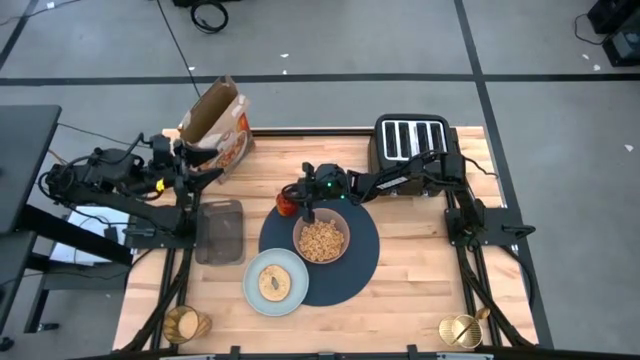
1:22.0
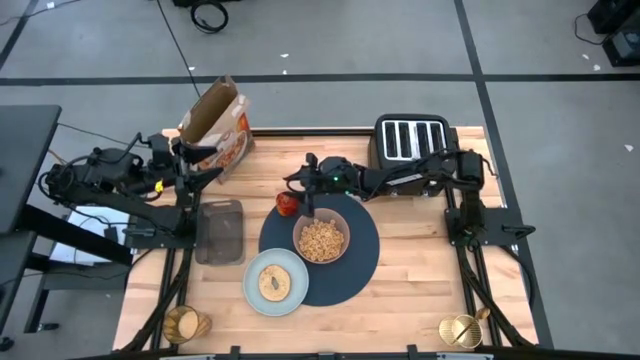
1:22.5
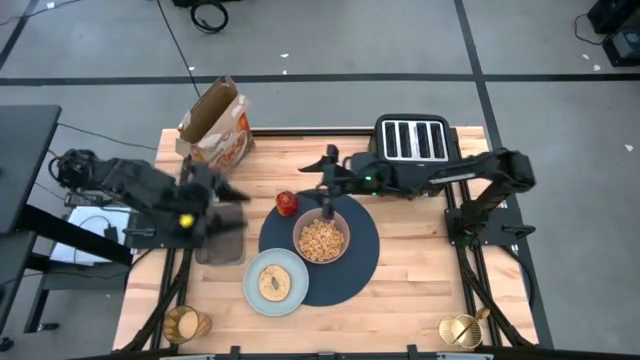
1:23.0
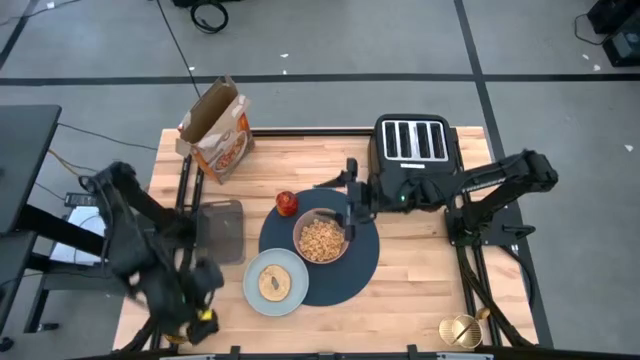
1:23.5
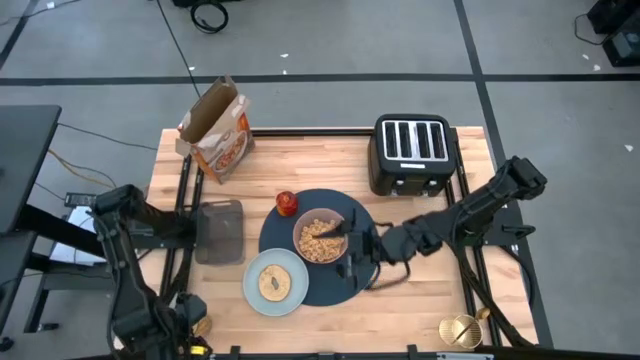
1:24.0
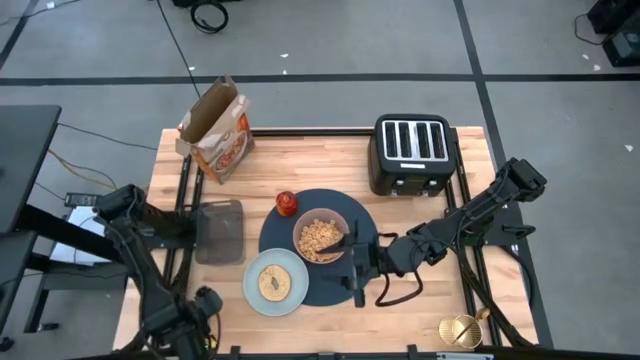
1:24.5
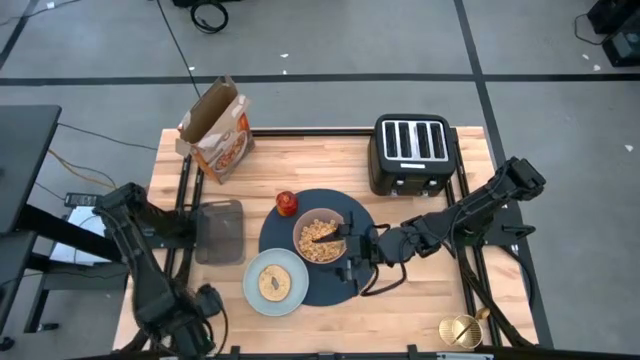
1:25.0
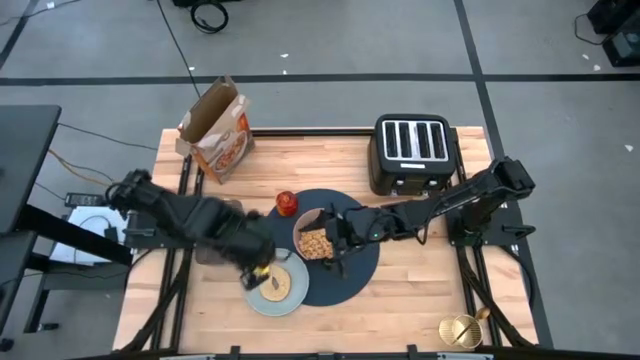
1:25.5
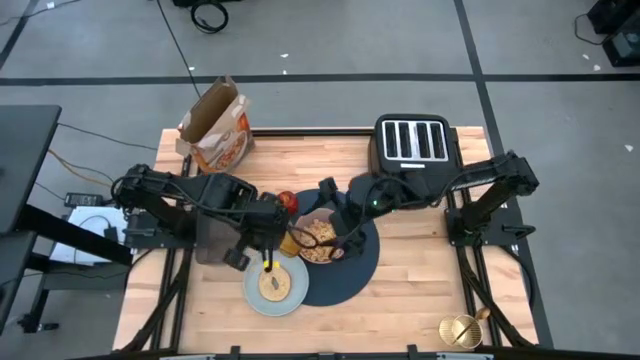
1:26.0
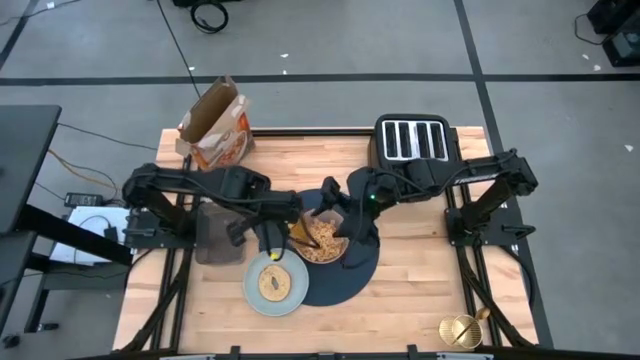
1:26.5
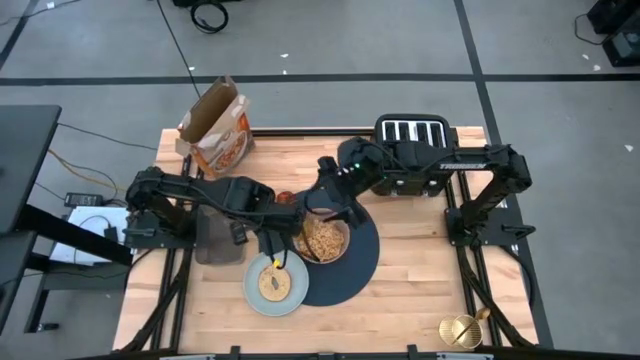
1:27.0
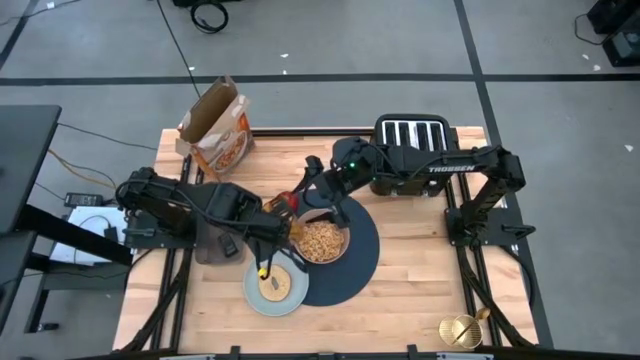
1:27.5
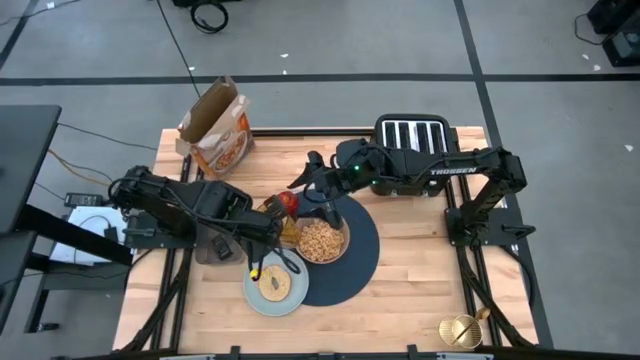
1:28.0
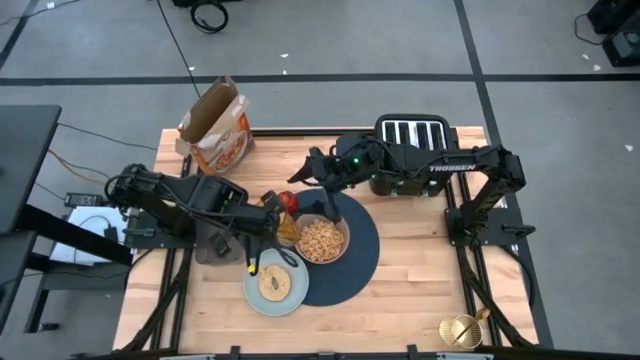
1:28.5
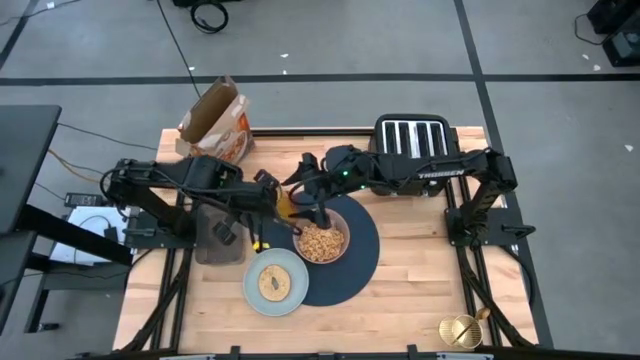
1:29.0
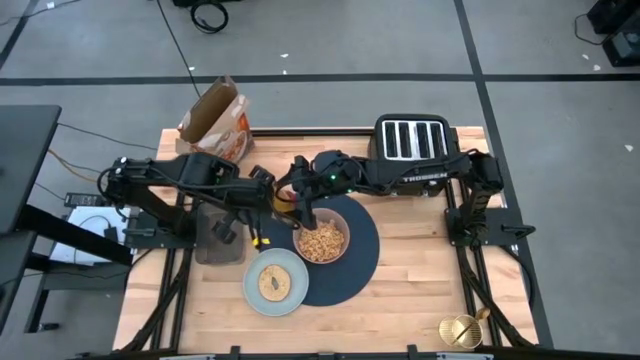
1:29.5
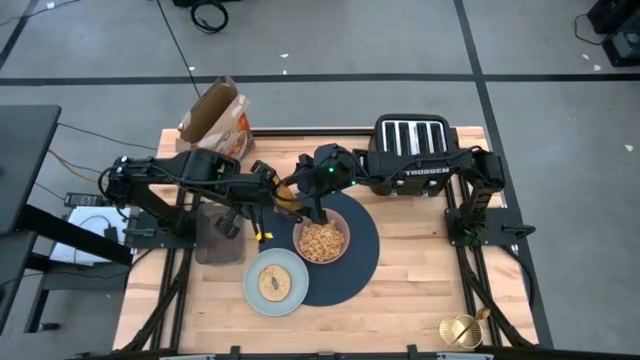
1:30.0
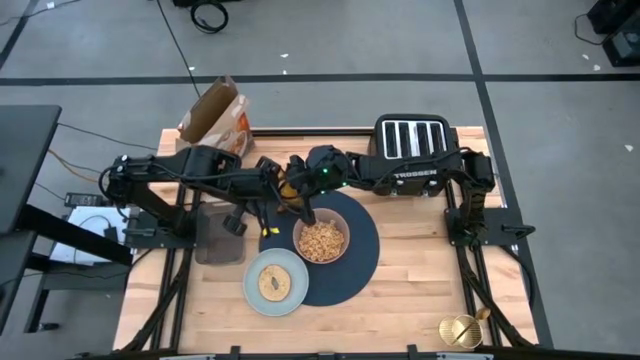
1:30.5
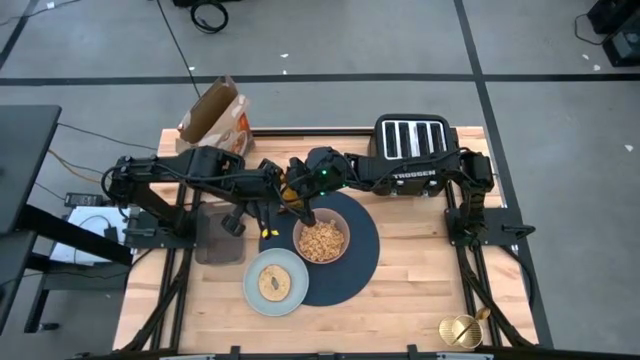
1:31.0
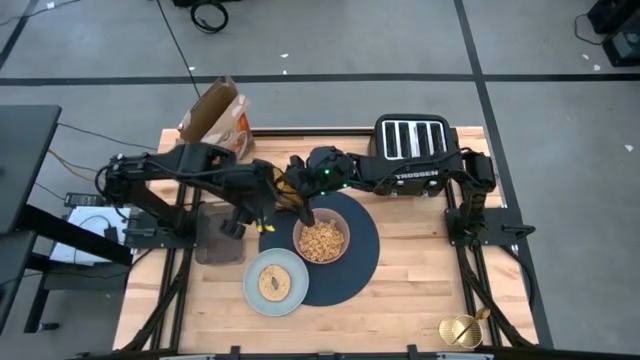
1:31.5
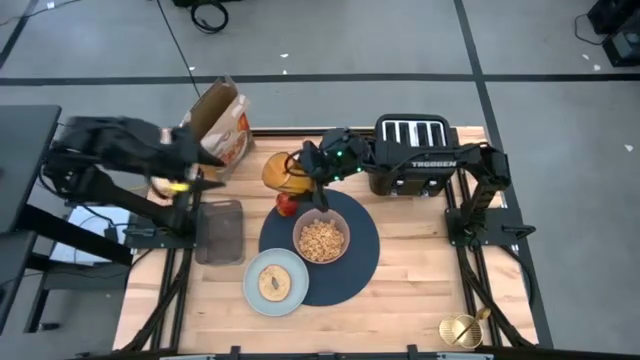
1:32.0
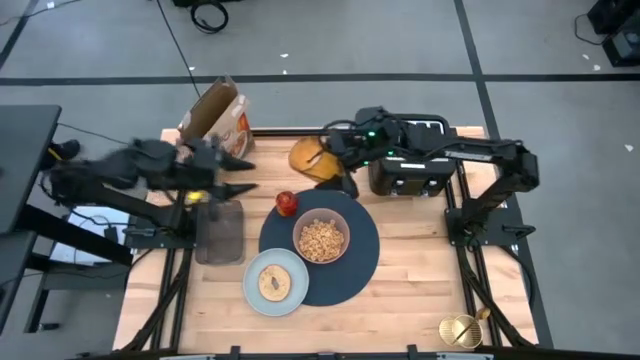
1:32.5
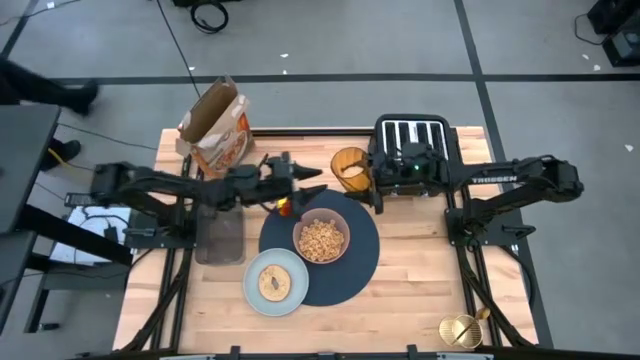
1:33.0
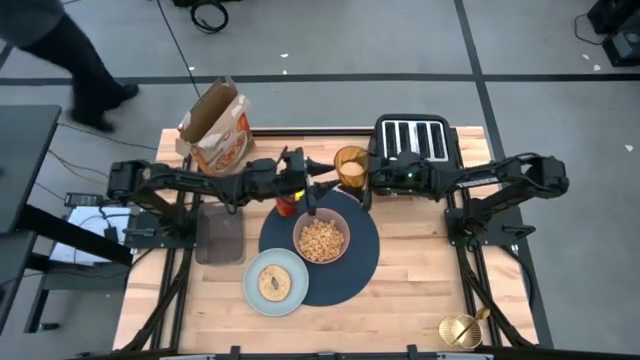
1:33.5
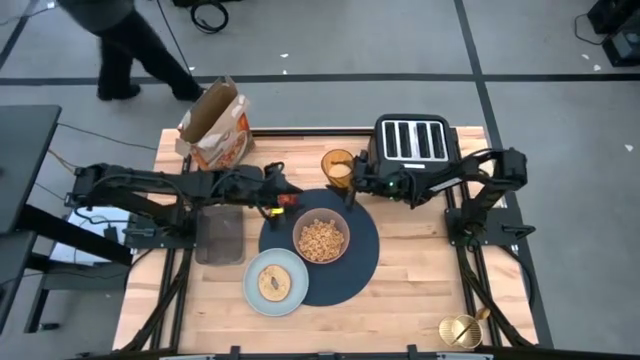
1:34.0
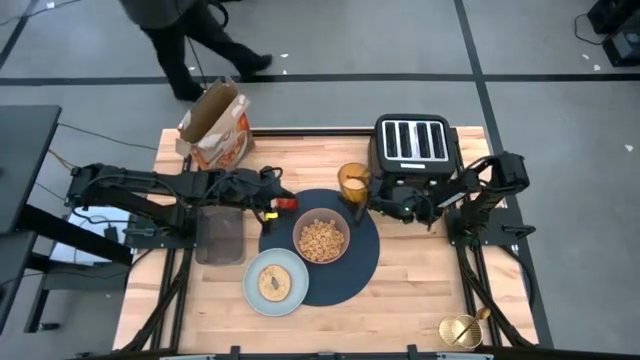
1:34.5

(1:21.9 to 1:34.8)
Task: Arrange a breakfast setting
Put the yellow cup on the top right of the orange bowl on the blue placemat

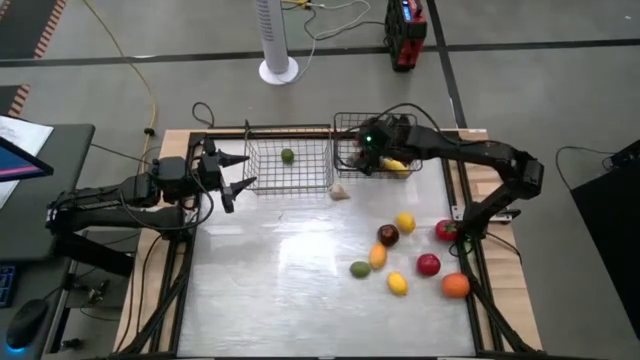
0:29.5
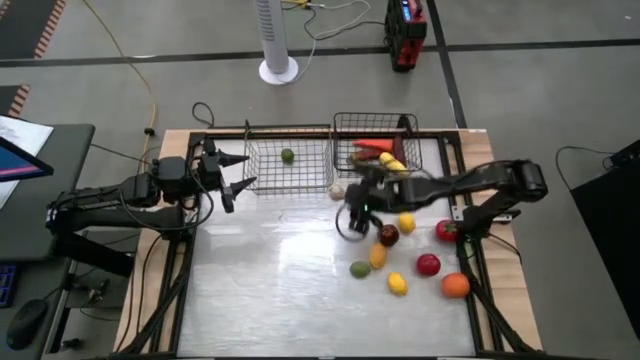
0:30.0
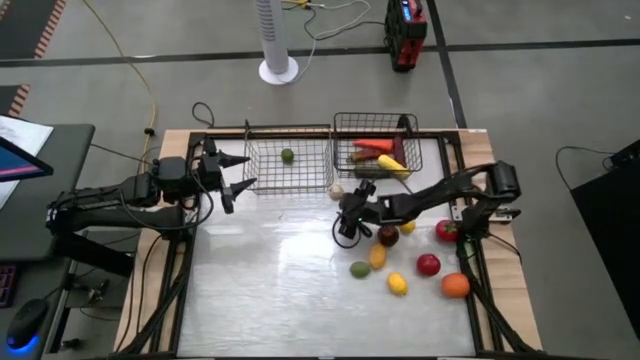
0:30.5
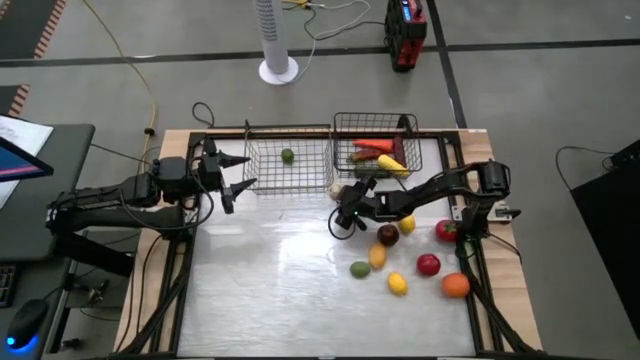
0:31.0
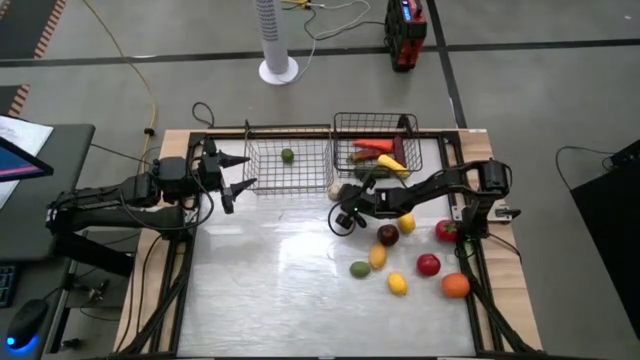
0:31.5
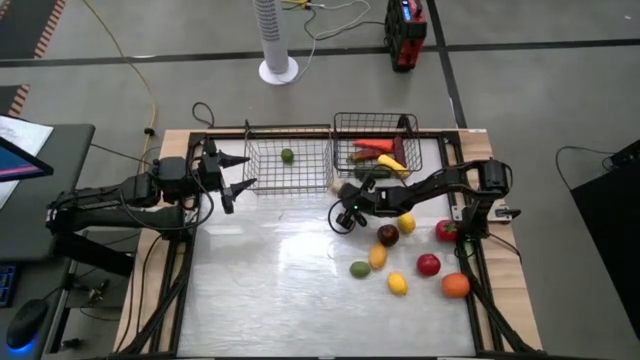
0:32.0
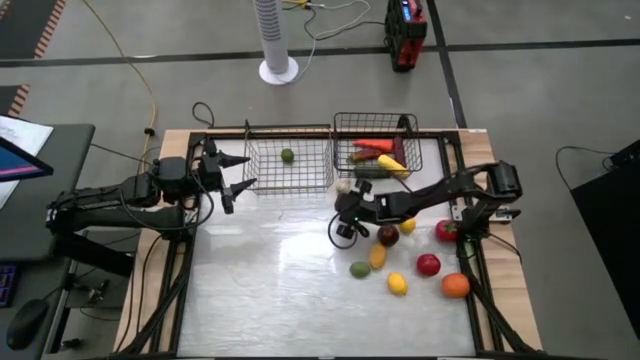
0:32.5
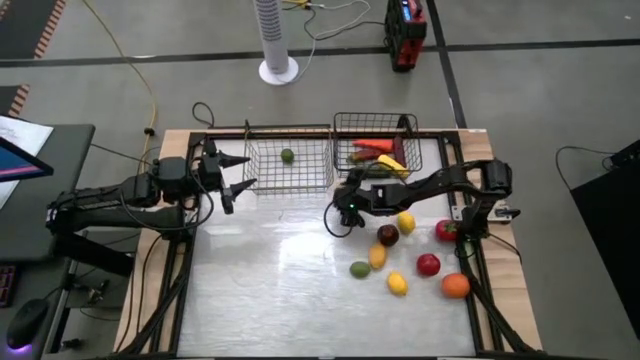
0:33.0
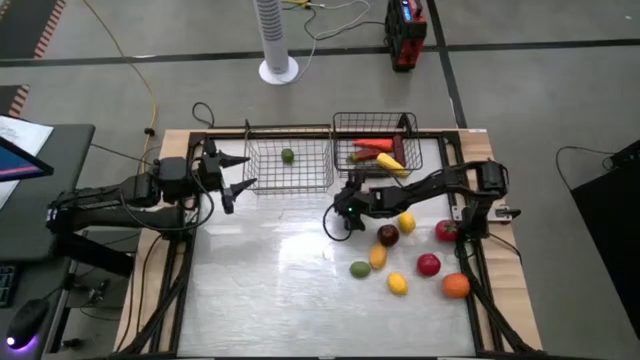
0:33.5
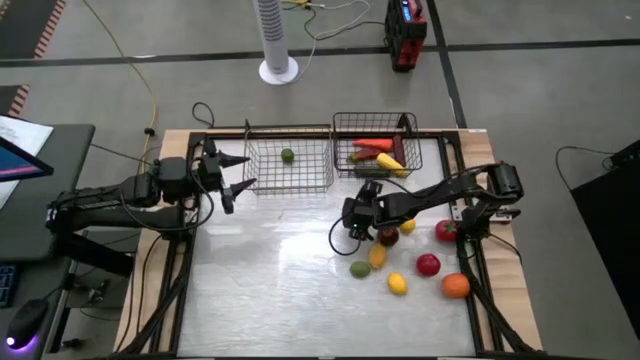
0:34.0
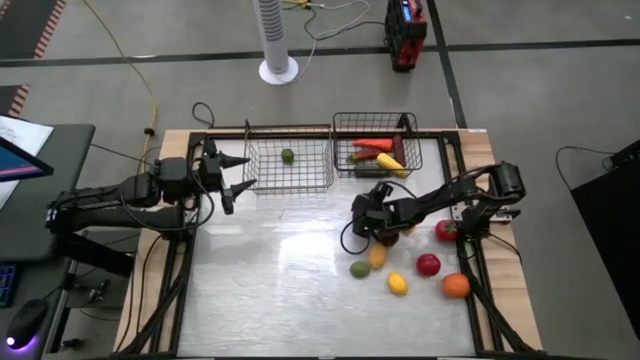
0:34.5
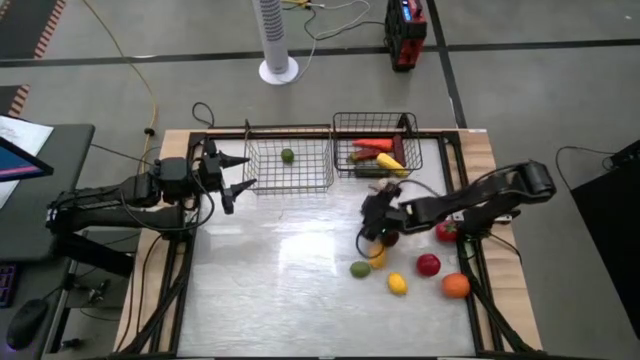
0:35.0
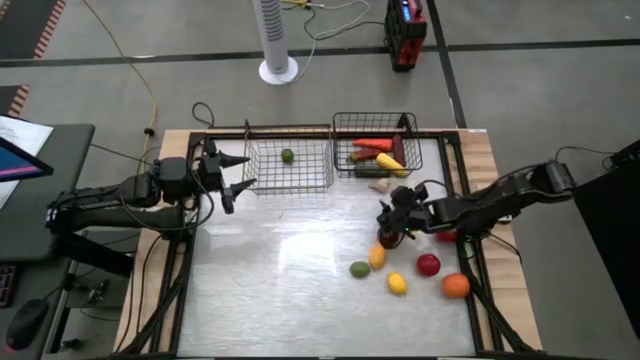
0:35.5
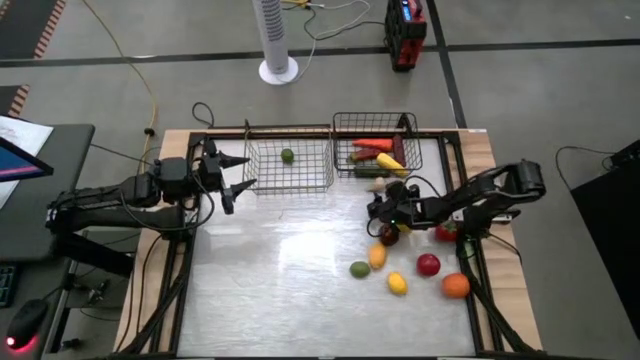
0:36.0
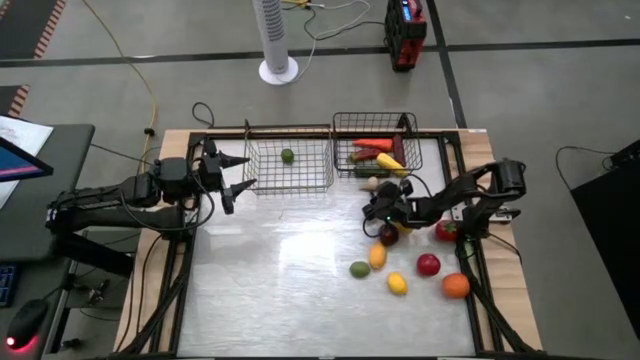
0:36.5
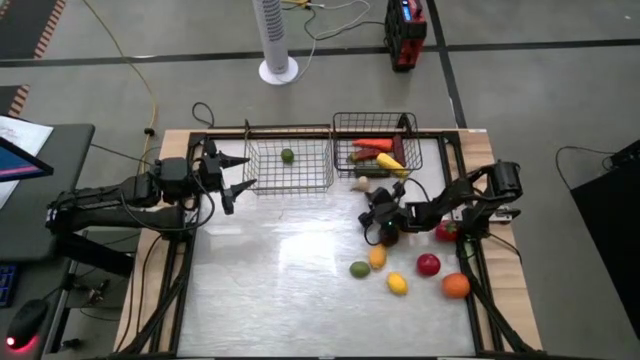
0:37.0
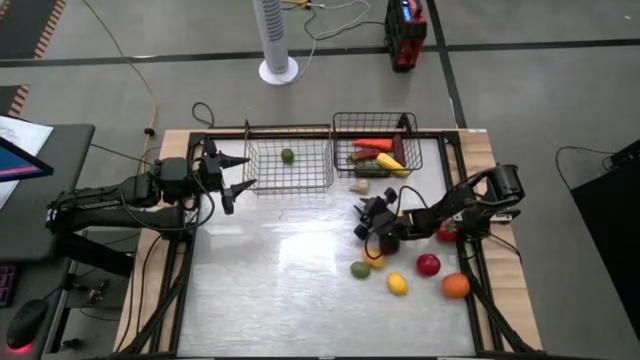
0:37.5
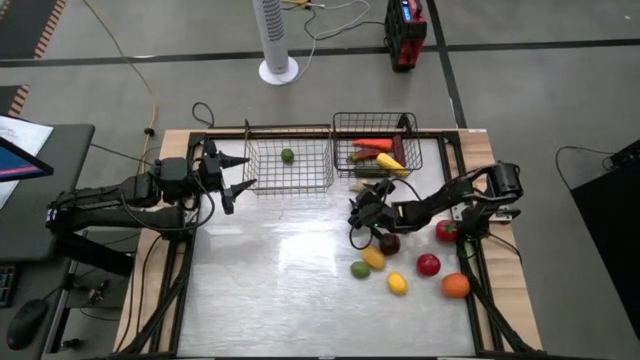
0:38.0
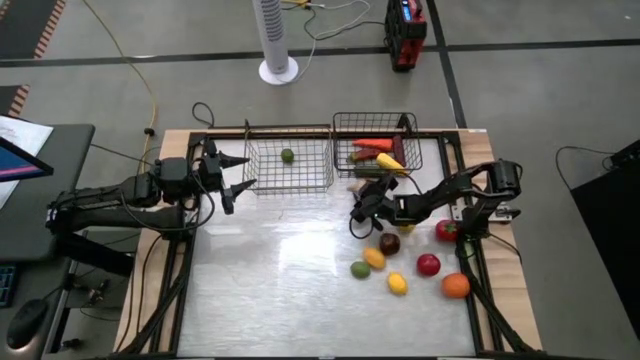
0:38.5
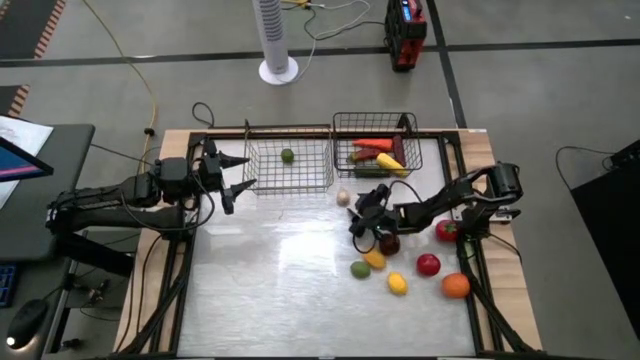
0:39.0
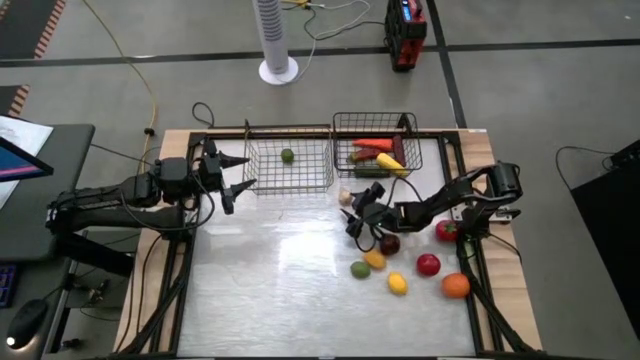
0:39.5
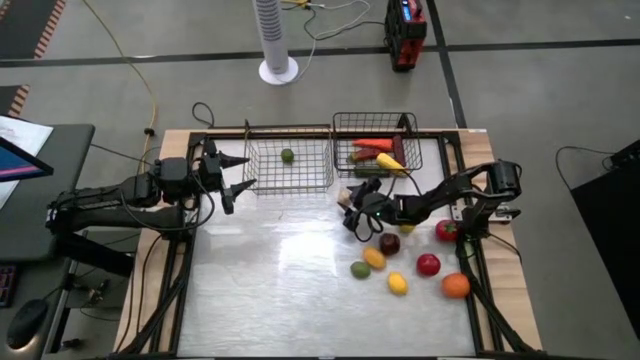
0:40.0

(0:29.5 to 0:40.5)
Task: Sort produce into baskets
Put the garlic into the right wire basket
